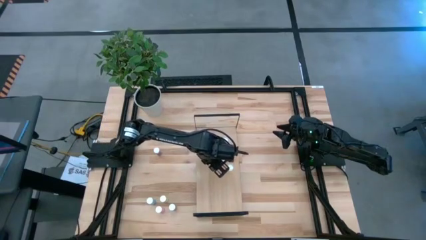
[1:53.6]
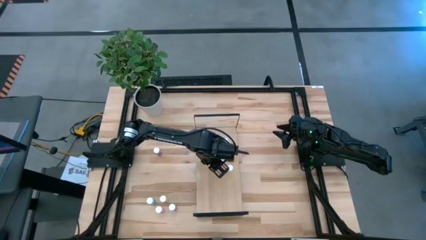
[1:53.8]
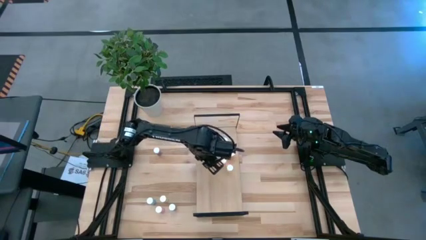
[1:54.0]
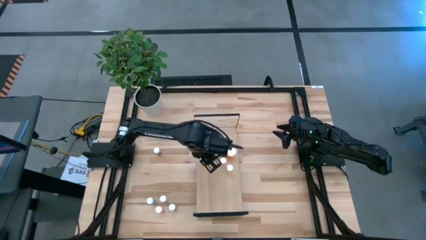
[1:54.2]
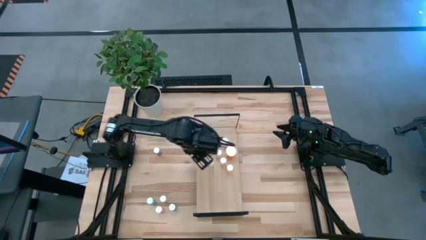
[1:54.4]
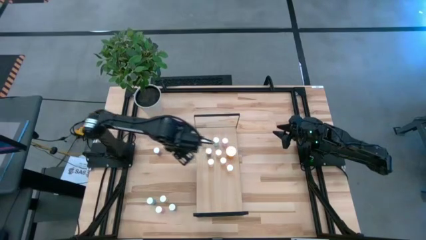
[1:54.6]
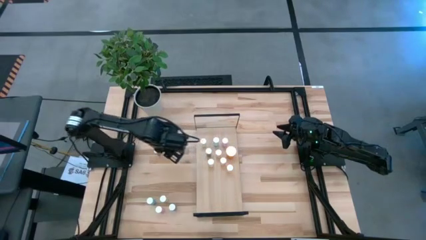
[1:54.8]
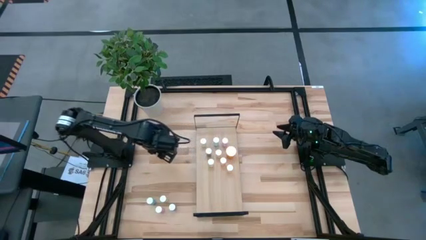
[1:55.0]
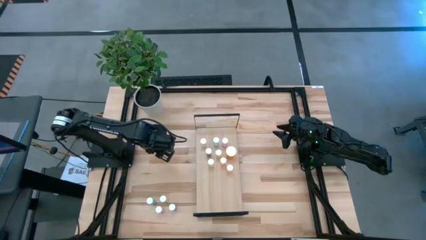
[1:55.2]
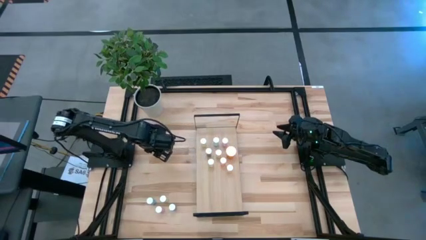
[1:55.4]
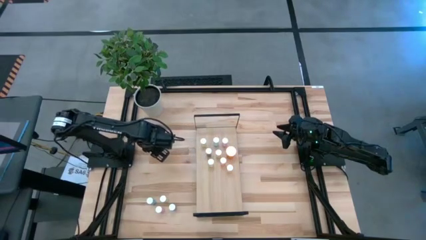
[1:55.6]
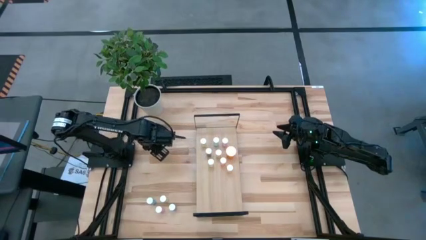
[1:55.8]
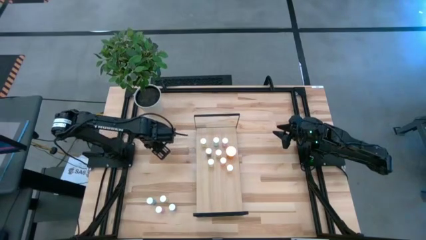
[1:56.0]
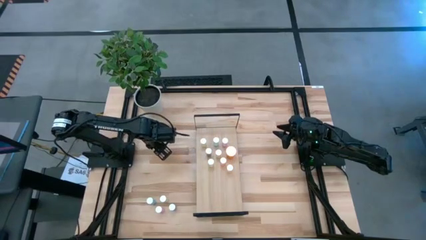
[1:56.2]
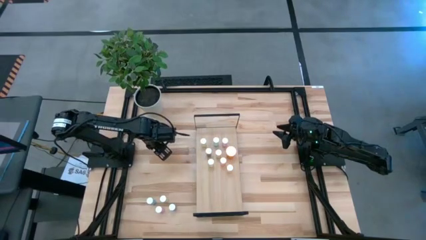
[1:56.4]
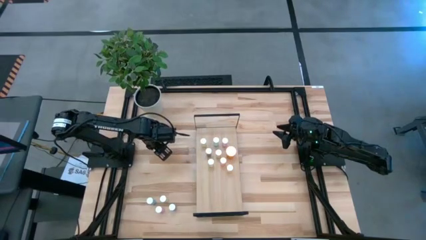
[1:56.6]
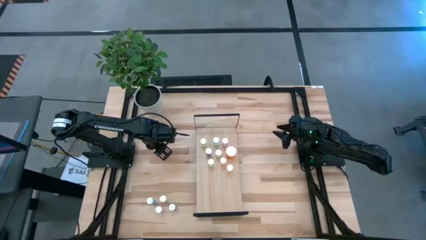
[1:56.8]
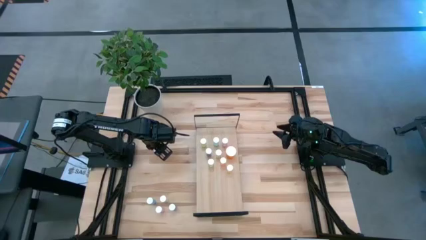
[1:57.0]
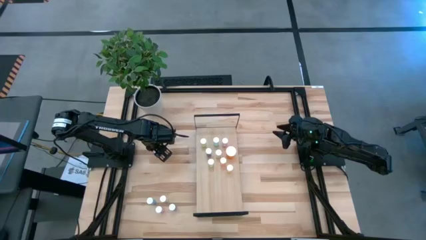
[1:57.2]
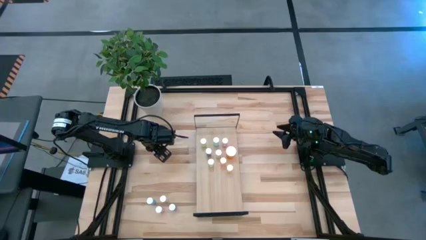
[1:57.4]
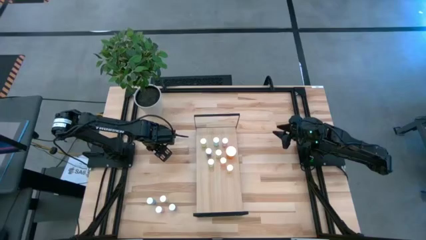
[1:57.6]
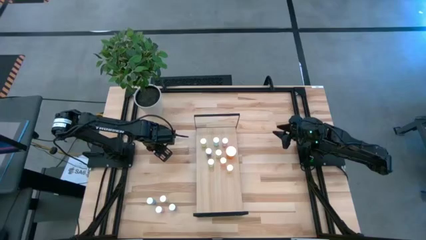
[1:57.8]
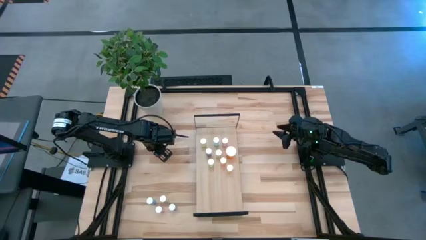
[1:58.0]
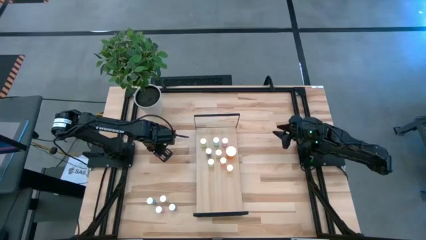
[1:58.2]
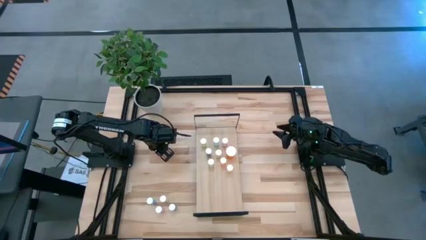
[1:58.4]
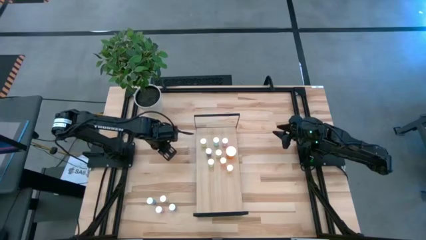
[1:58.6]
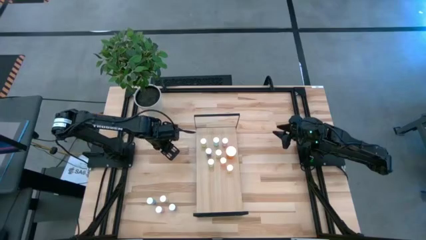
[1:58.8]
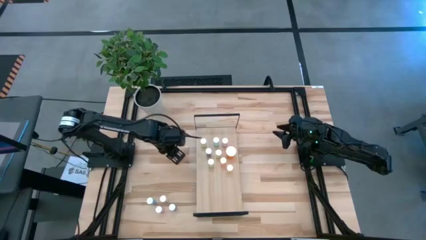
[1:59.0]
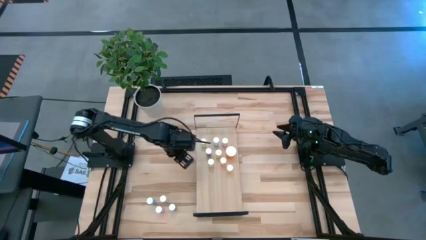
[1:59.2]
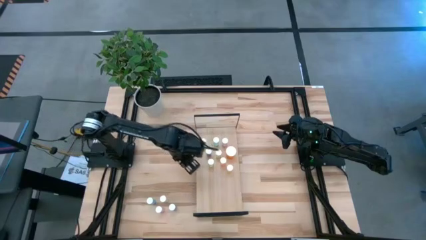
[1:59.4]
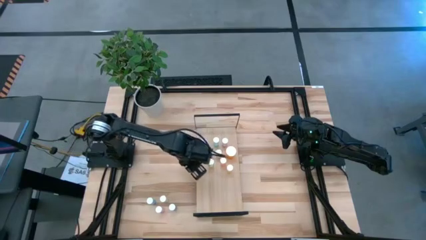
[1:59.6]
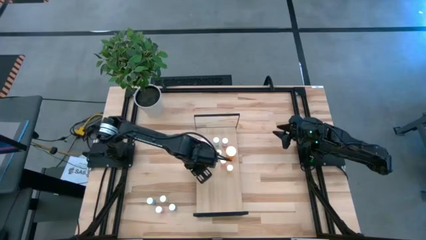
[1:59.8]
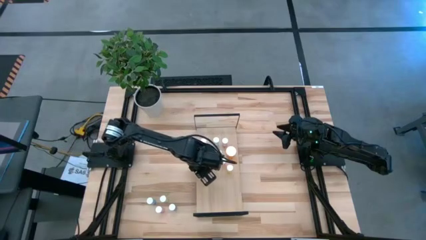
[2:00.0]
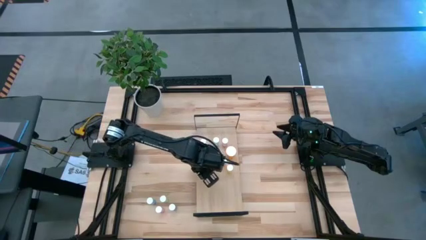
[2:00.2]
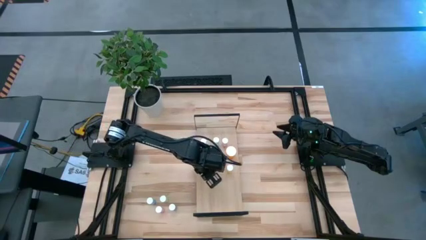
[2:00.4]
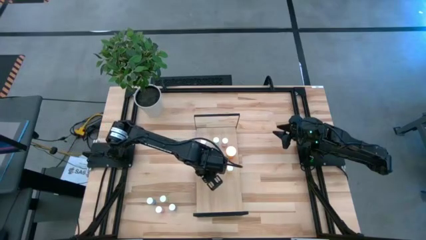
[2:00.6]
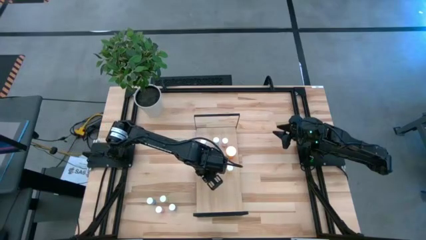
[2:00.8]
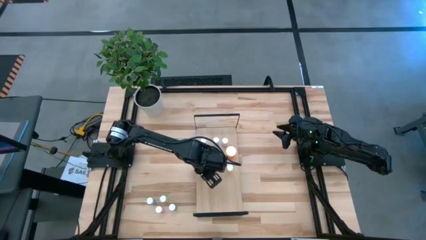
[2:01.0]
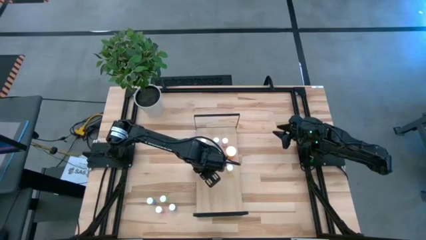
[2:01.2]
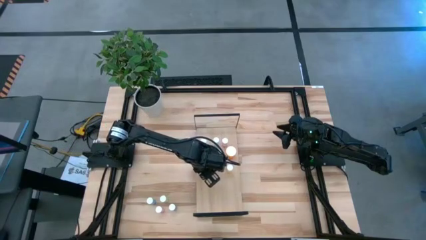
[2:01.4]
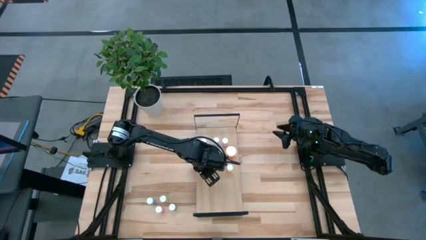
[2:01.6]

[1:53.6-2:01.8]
Task: Pick and place medicine bottles onto shelf by color
Put the blue pill bottle on the shelf

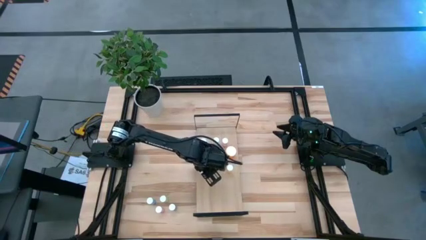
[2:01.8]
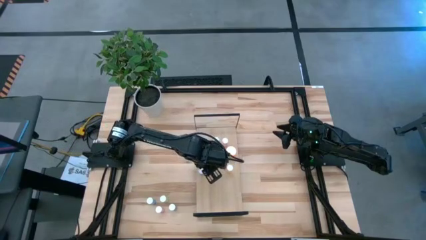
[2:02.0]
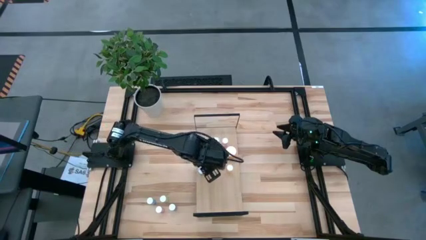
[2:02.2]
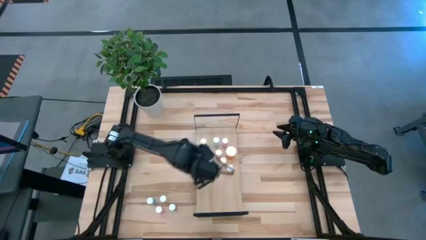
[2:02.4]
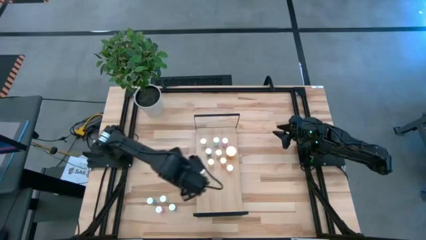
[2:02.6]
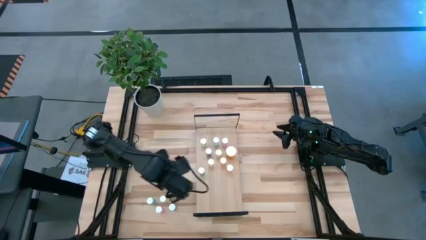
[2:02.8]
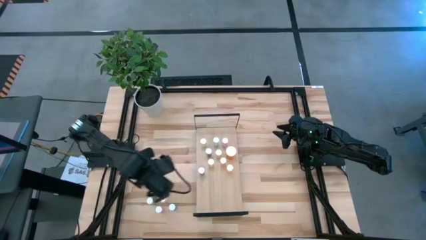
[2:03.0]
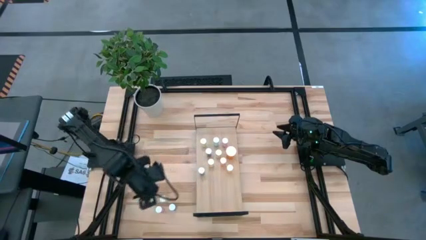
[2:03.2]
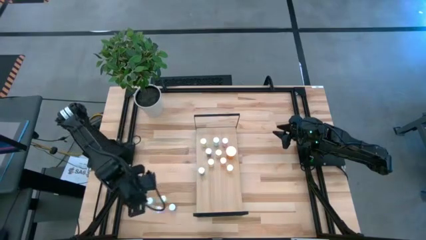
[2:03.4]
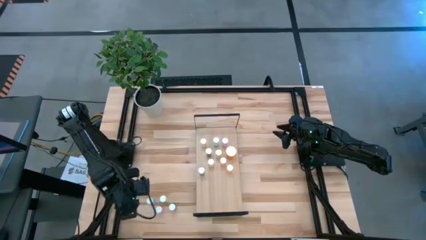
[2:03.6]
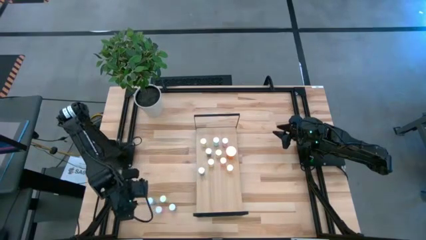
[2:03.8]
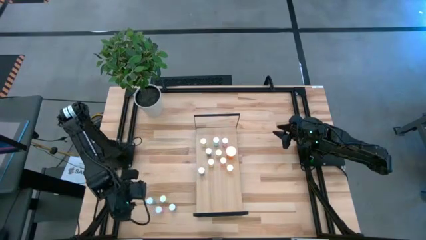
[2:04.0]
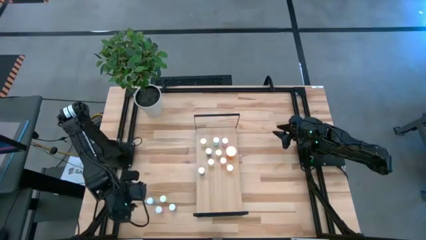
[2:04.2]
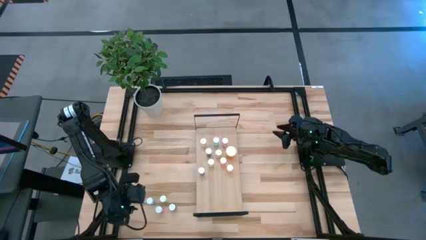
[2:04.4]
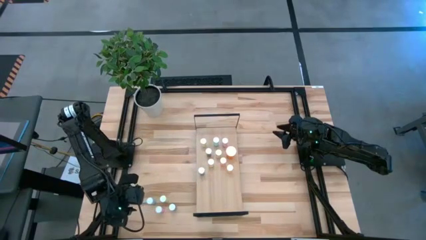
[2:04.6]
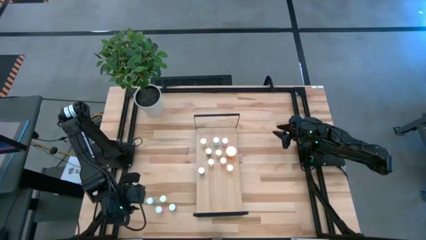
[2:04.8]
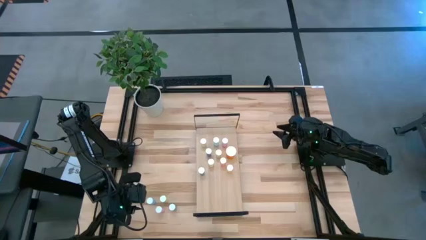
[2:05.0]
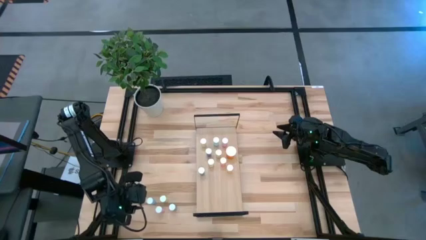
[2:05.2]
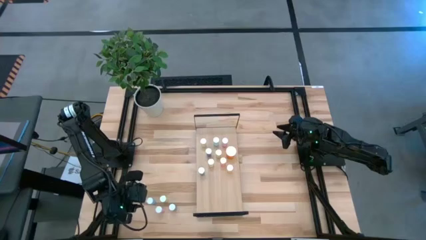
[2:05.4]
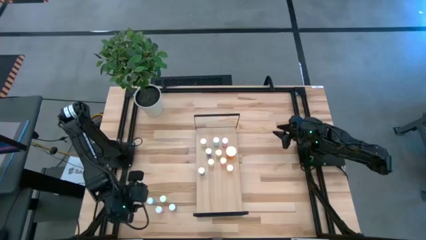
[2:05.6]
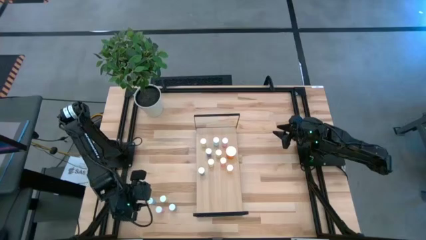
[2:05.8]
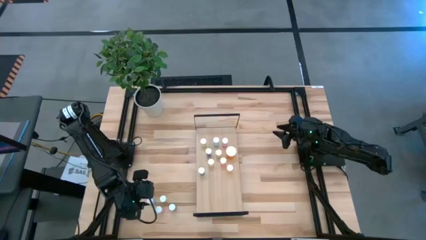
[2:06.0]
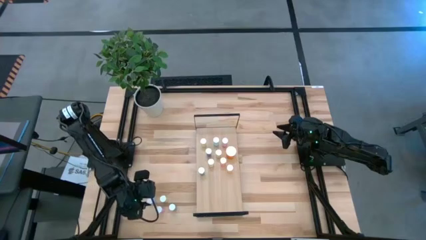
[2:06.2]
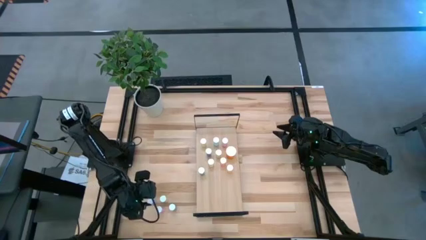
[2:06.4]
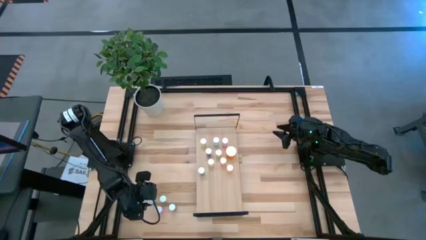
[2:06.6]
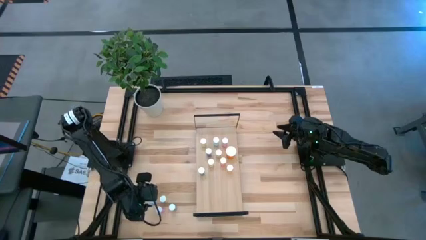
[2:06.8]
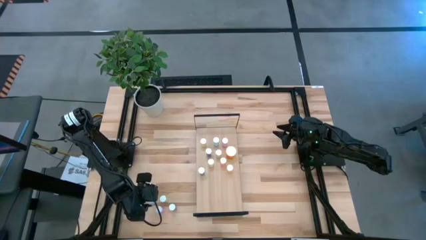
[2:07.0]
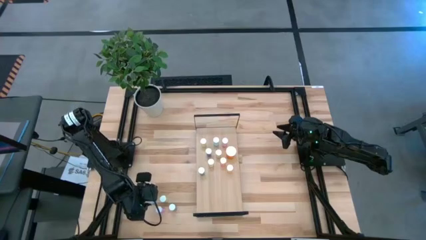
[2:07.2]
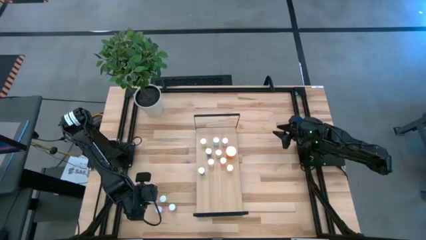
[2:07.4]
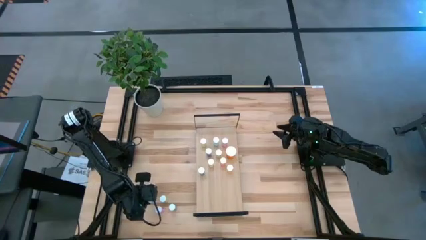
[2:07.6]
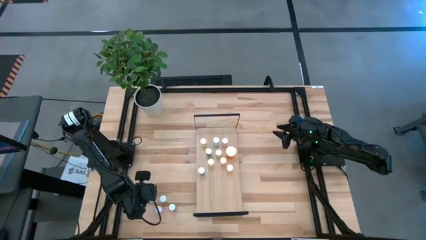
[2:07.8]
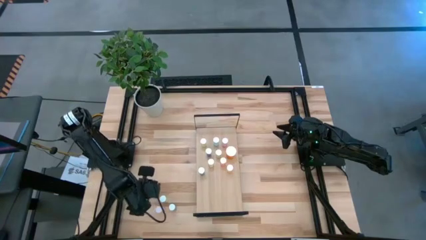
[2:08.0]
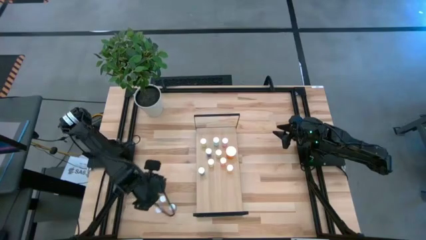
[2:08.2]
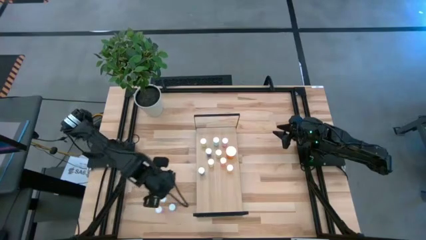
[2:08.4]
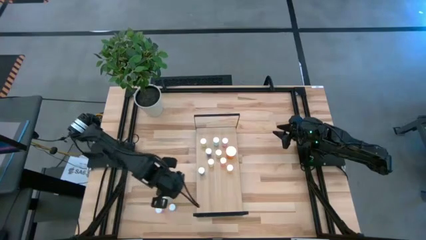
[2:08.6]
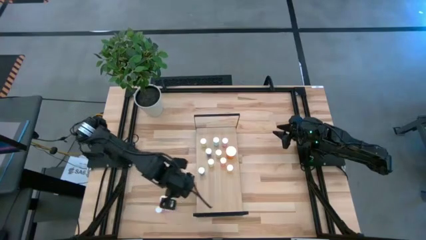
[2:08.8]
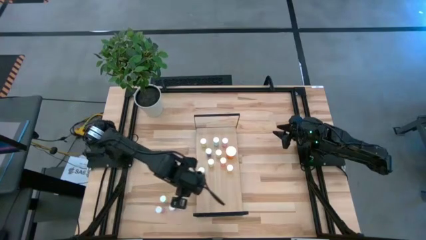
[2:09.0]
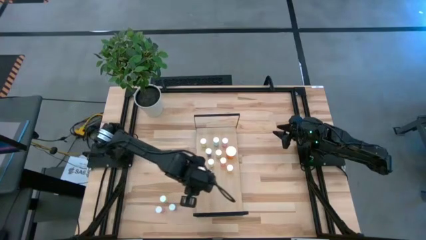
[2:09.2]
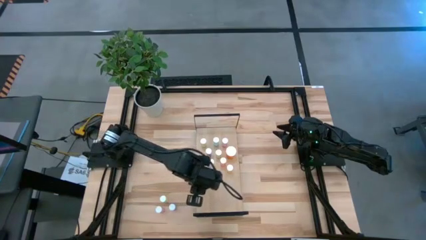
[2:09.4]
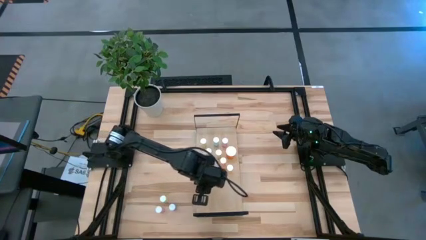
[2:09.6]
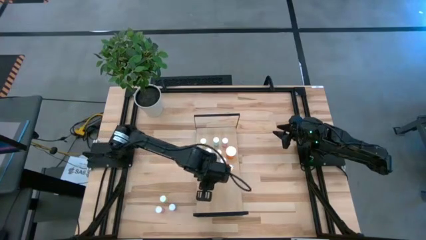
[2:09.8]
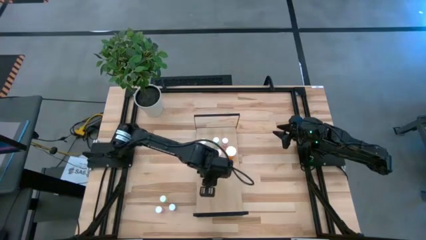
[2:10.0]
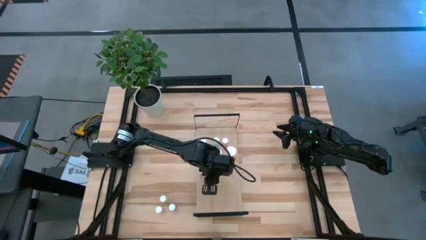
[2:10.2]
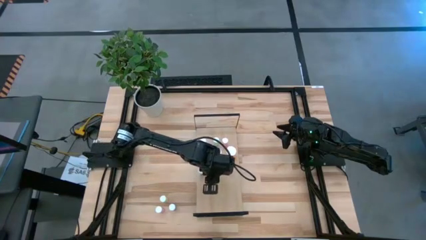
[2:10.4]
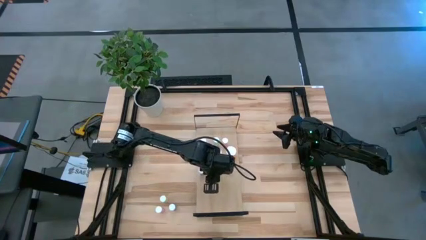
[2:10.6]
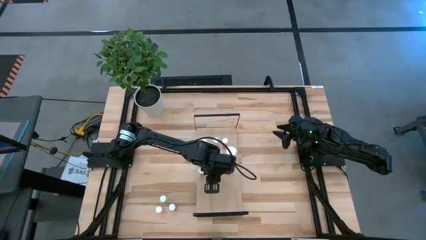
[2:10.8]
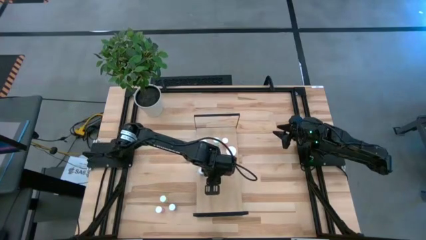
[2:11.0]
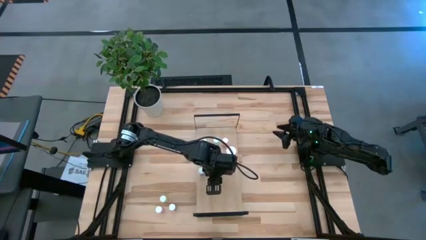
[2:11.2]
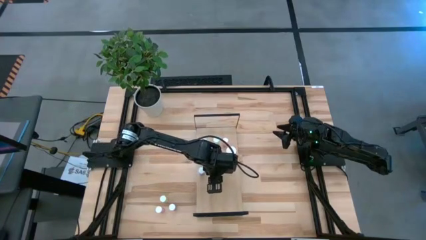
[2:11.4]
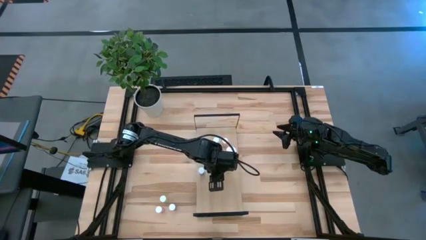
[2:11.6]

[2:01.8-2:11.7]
Put the blue pill bottle on the shelf
